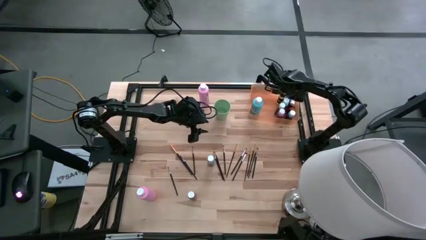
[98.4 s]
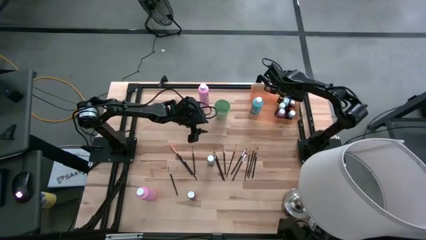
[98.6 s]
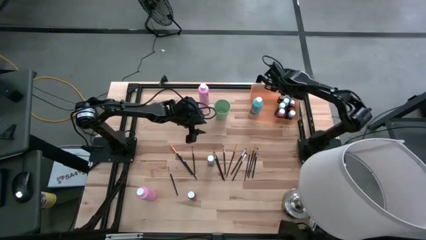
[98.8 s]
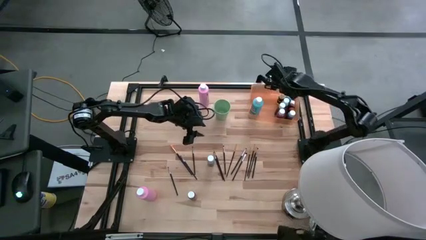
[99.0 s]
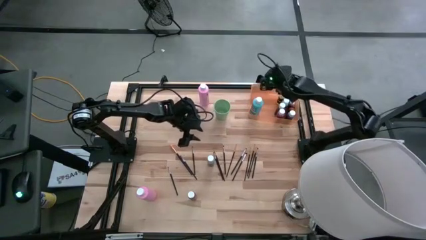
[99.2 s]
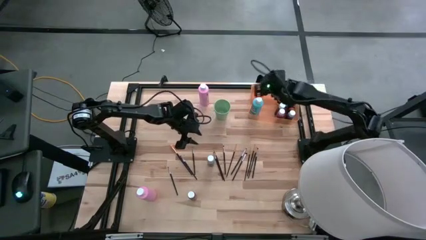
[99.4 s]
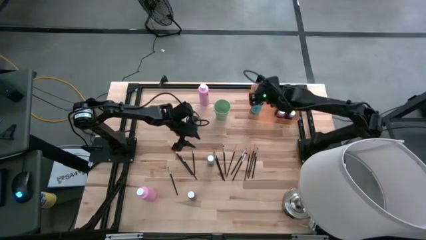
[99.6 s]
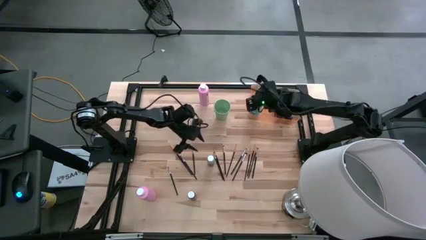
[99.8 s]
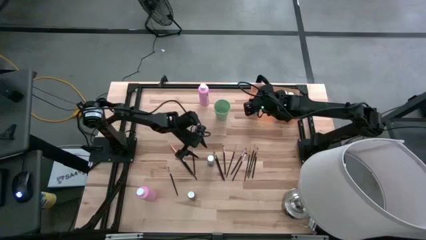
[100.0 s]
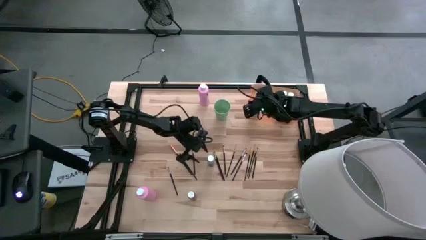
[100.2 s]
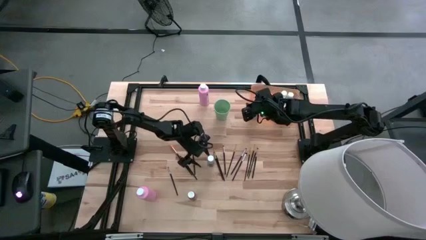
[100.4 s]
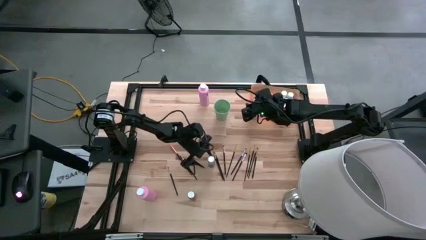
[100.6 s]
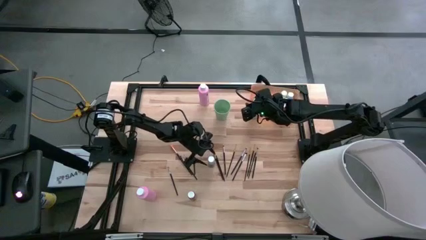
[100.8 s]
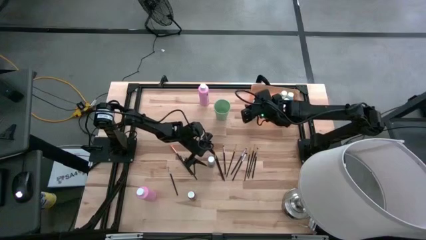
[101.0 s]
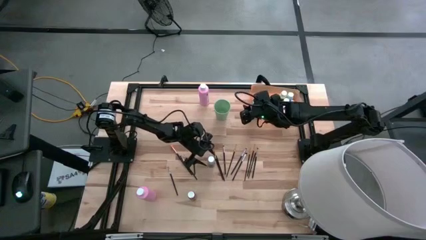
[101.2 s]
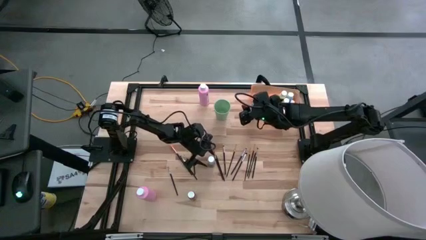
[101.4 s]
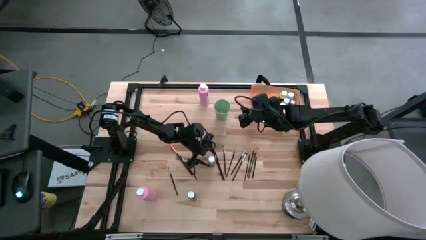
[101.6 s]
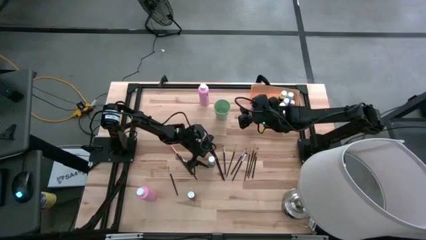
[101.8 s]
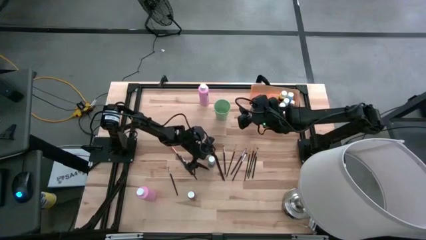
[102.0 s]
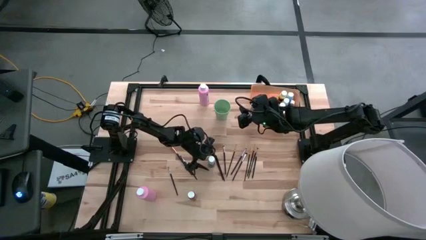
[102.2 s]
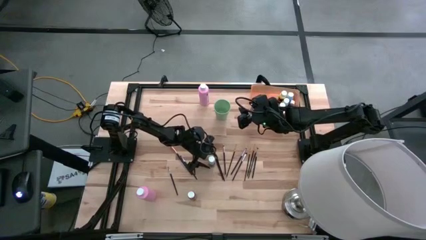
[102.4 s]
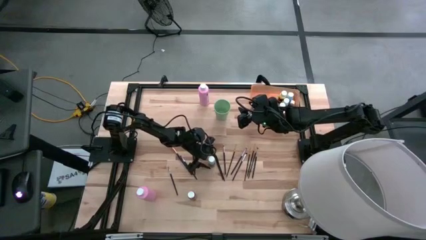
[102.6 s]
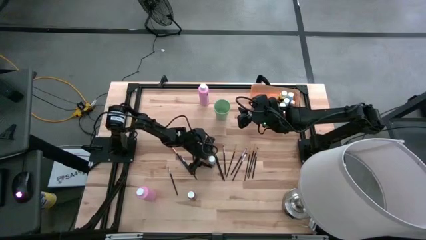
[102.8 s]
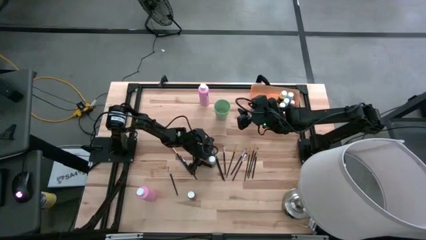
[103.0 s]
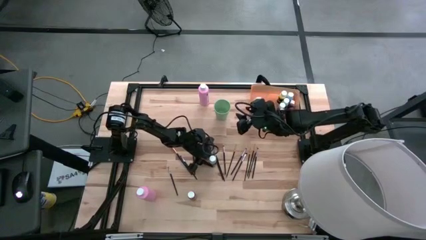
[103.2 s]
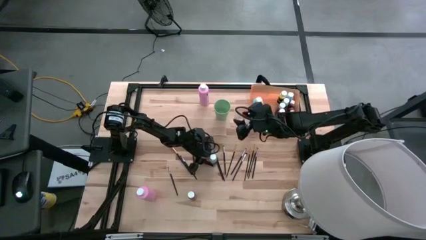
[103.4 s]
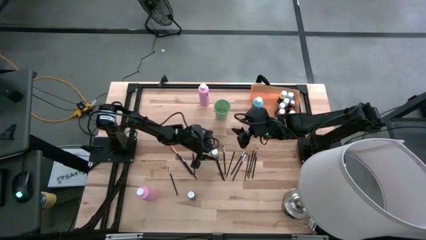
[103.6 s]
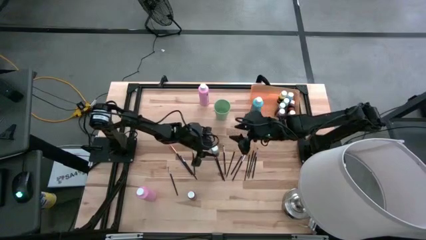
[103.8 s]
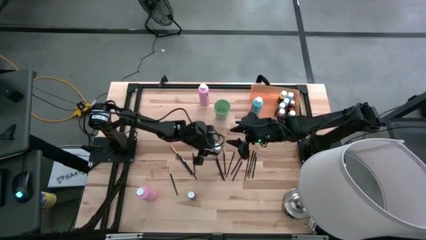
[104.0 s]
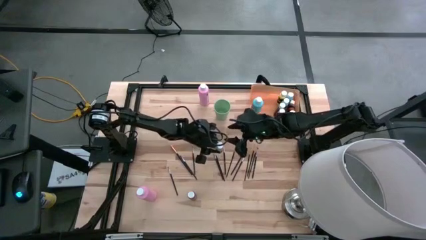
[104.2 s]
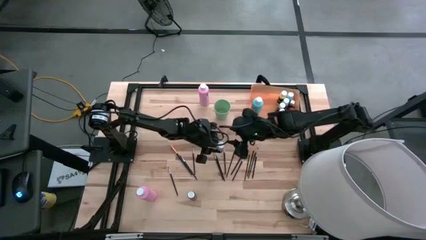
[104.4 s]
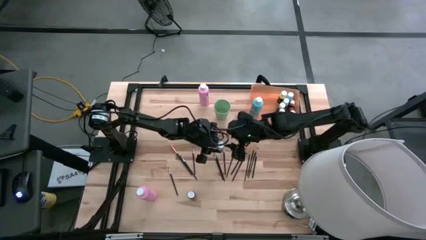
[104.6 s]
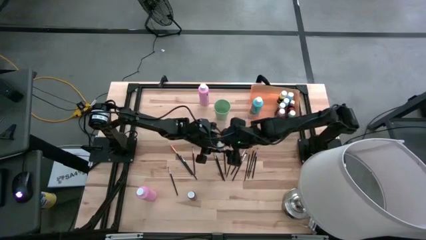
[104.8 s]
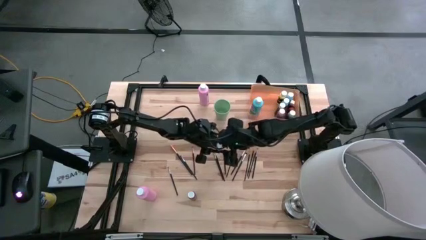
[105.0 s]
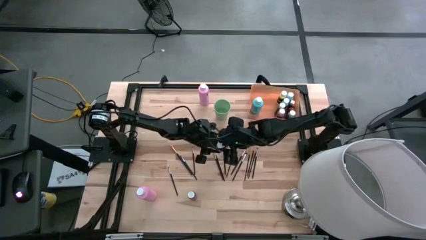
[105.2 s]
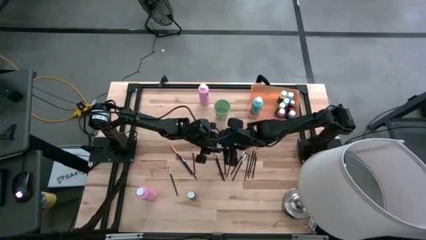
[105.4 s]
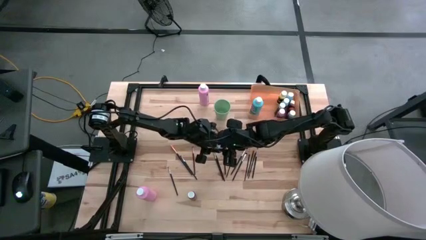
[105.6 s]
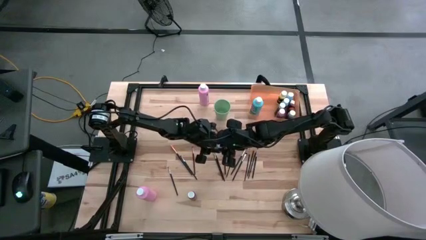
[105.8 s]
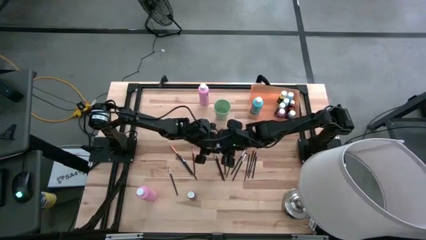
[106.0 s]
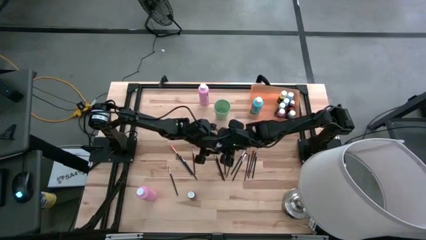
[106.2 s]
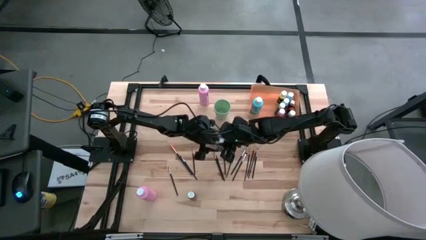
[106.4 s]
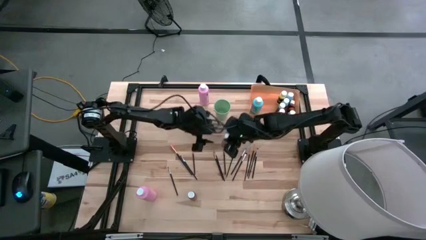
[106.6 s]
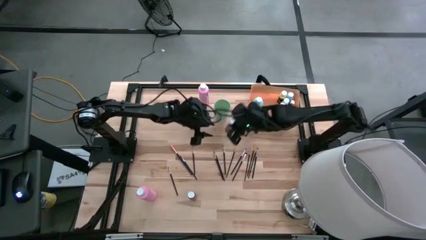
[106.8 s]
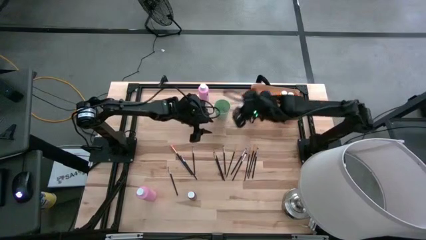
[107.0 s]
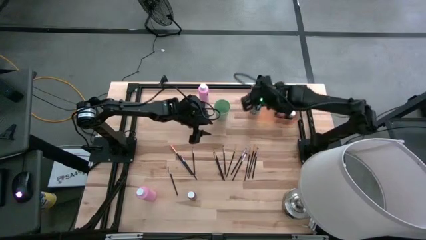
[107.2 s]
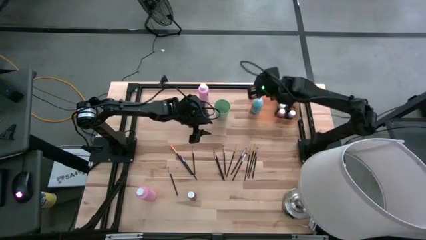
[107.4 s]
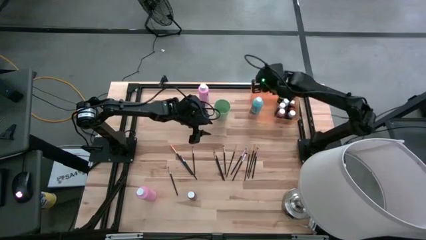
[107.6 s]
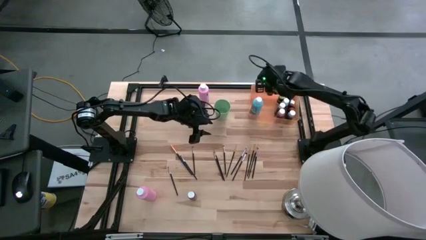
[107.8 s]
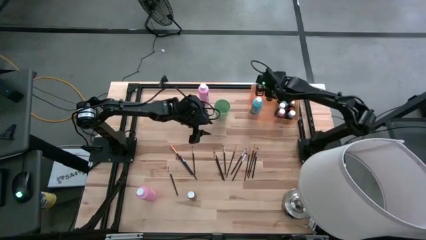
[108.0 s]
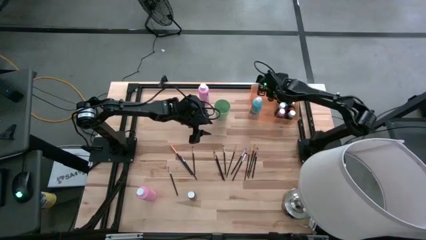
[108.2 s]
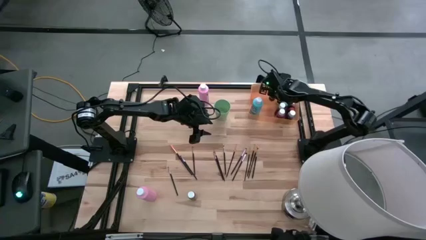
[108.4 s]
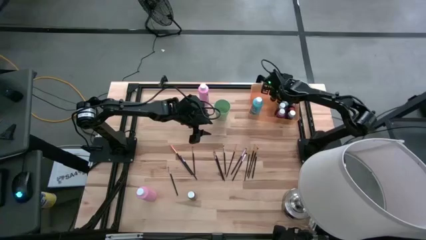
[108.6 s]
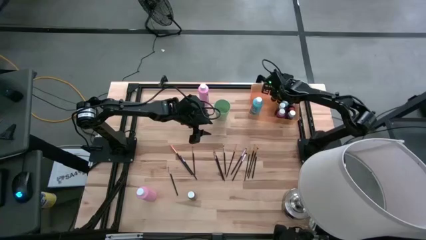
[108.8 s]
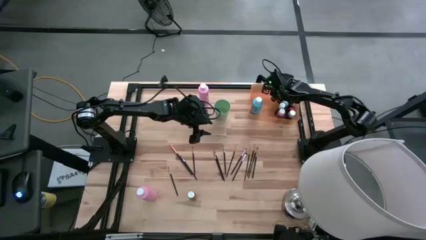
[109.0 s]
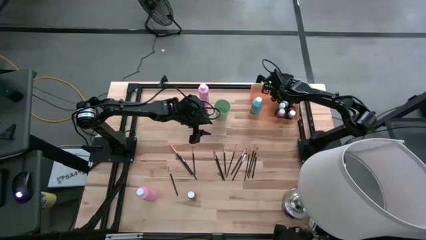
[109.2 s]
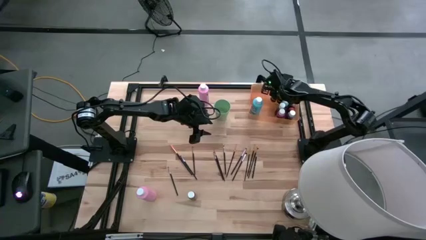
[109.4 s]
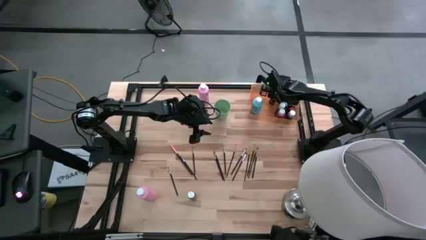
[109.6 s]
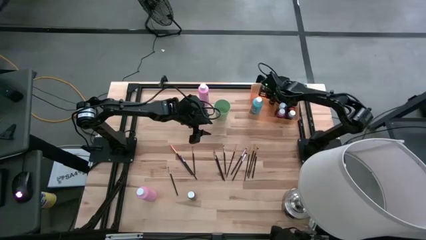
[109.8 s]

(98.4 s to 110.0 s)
Task: Pick & Place Paint Supplies
Put the small gray paint bottle into the orange bin

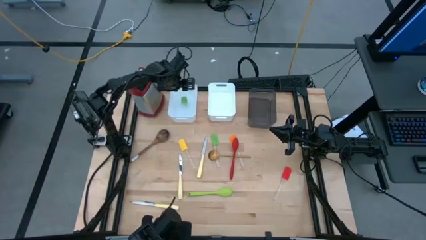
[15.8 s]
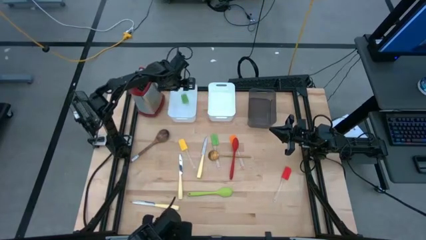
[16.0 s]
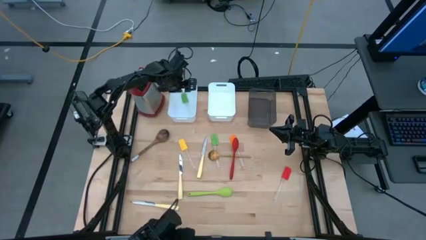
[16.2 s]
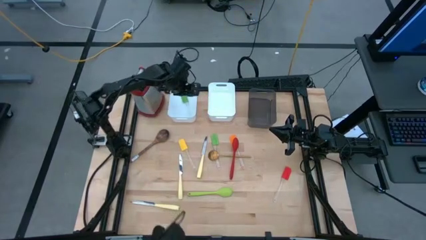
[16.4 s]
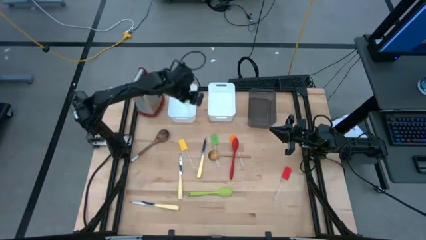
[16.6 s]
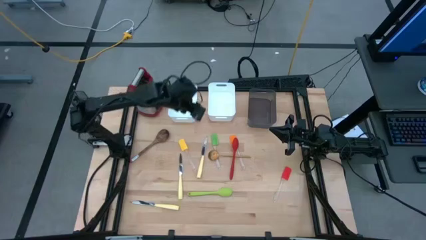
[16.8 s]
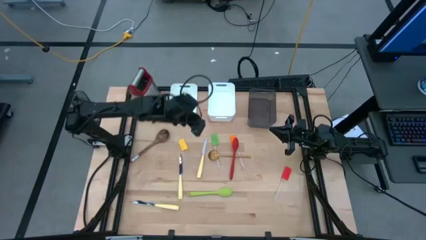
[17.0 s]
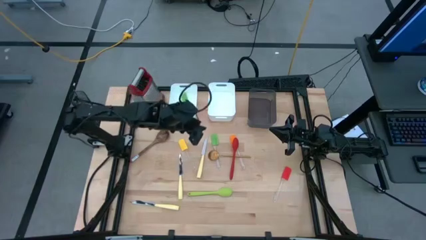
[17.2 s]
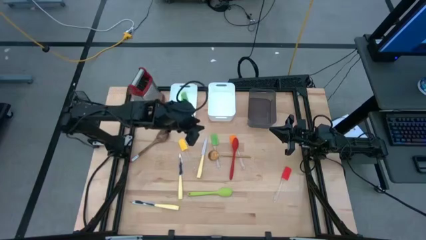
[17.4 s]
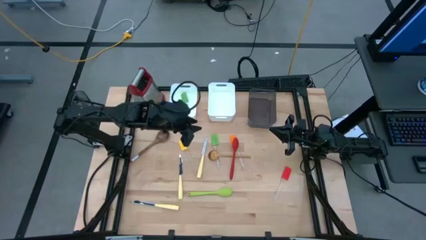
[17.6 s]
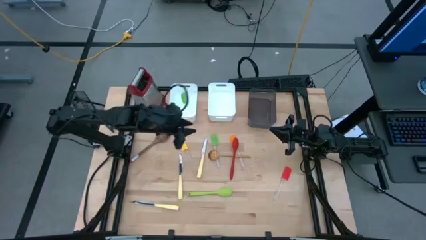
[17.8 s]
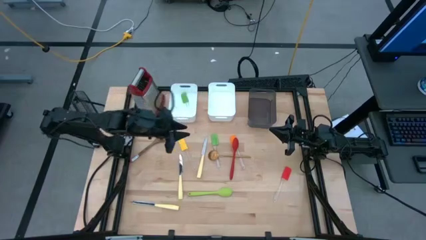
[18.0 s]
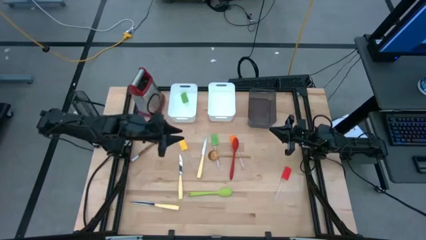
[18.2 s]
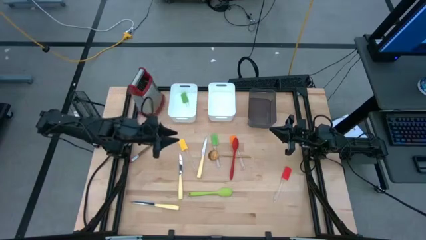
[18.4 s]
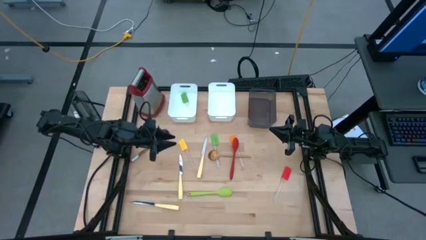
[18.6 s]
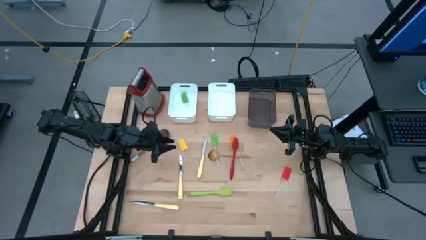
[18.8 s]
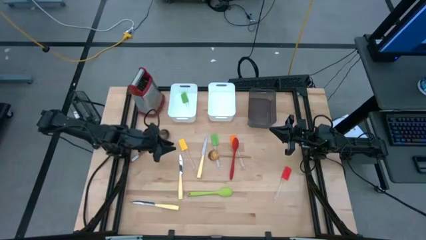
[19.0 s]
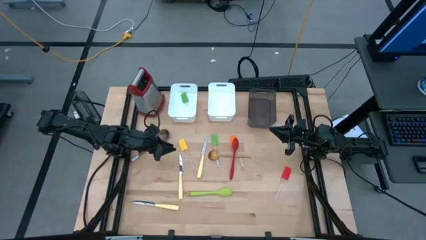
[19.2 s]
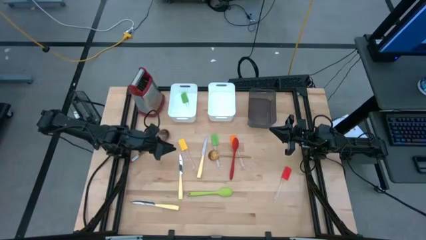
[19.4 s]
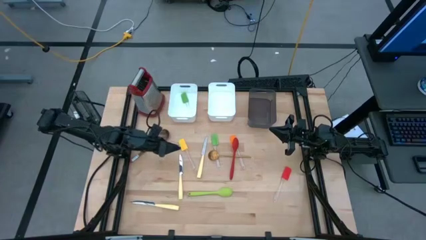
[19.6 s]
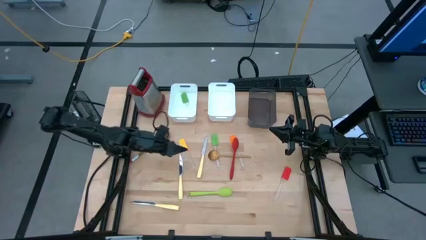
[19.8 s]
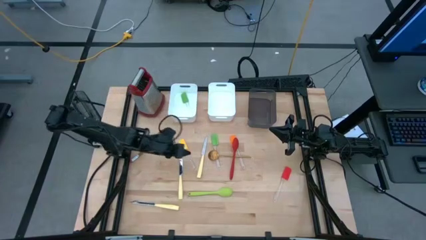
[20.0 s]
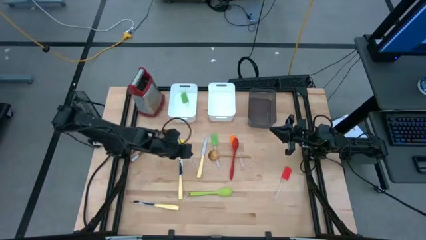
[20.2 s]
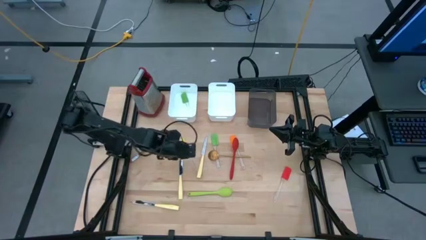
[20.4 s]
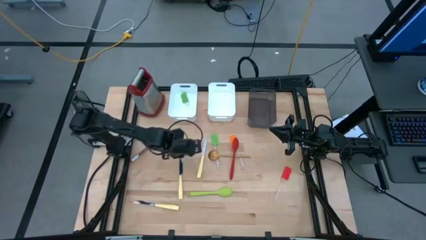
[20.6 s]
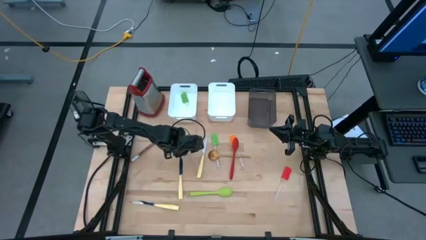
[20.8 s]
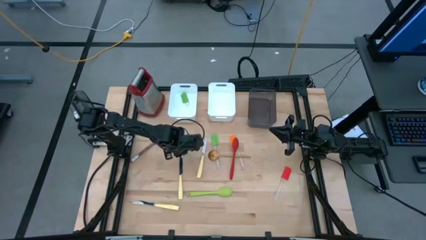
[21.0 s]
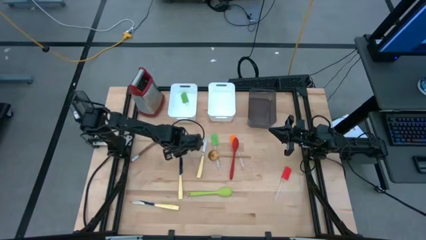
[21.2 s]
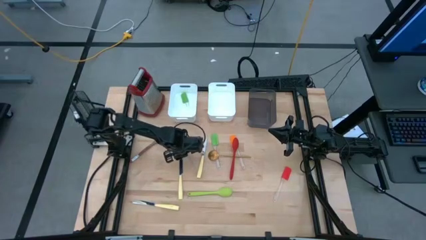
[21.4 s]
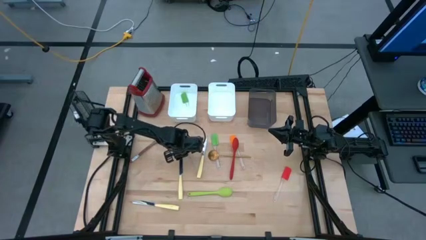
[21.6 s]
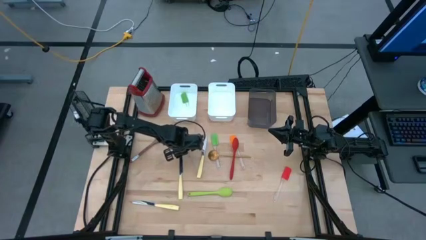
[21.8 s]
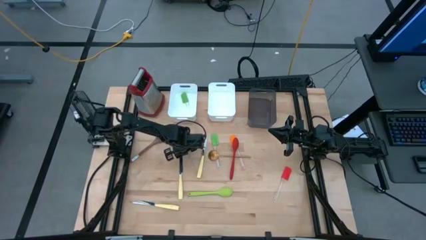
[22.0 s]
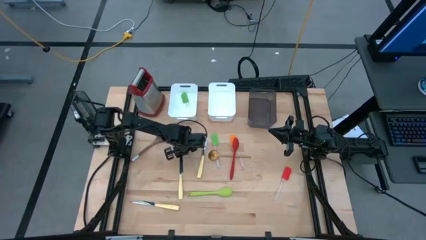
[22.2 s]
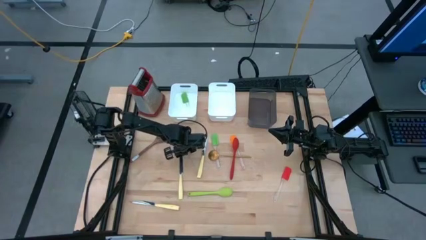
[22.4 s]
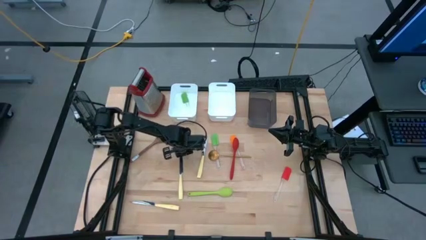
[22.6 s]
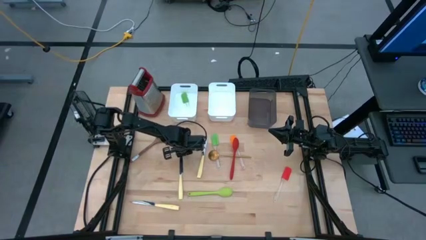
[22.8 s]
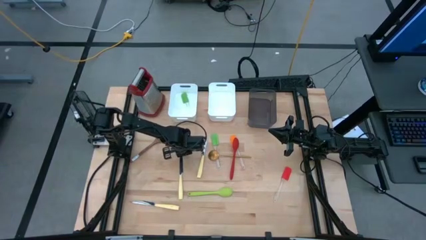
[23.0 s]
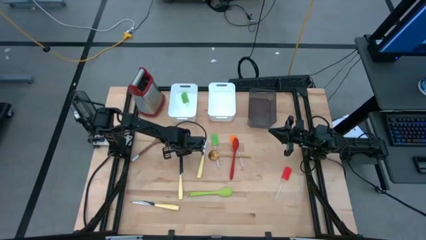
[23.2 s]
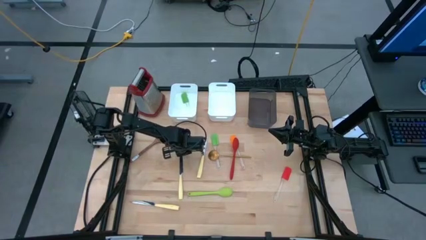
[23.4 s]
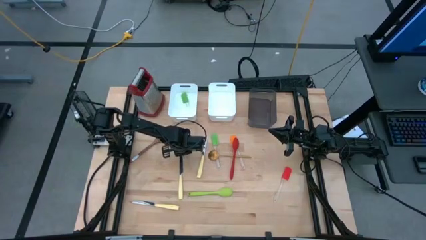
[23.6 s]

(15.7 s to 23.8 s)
Task: Pick & Place Kitchen Items
Put the yellow spatula into the left white bin
